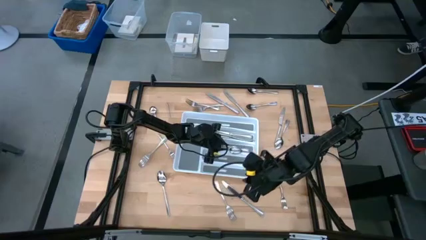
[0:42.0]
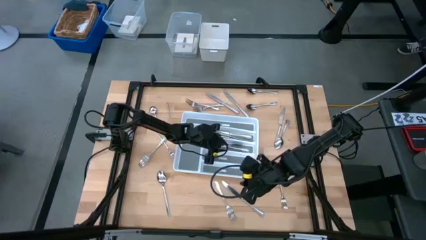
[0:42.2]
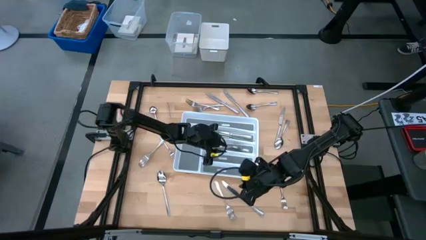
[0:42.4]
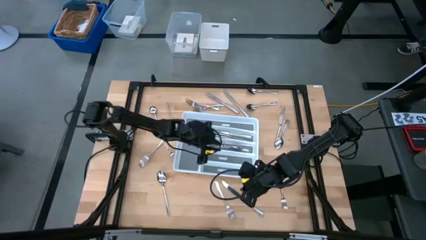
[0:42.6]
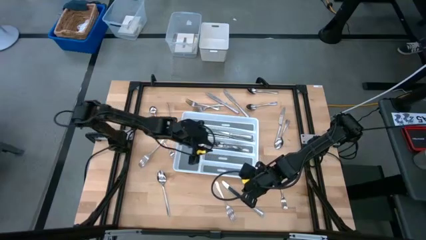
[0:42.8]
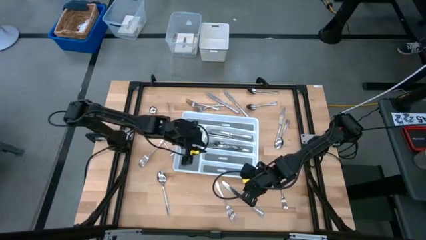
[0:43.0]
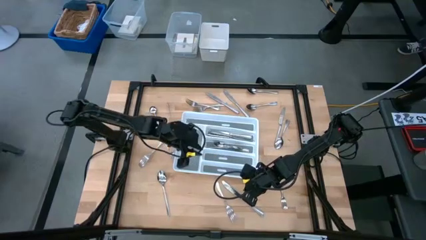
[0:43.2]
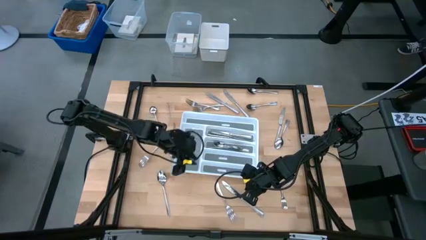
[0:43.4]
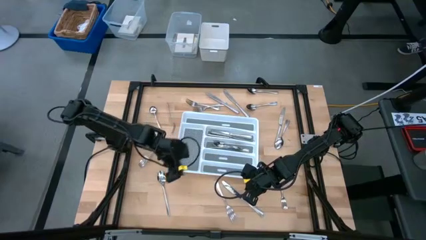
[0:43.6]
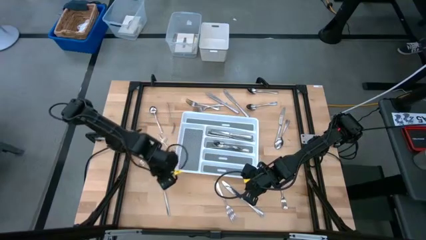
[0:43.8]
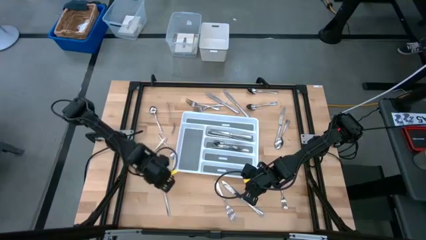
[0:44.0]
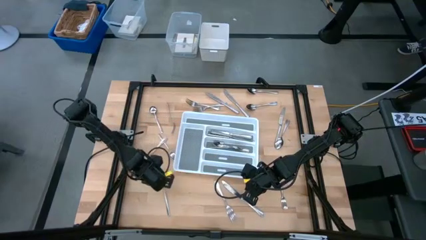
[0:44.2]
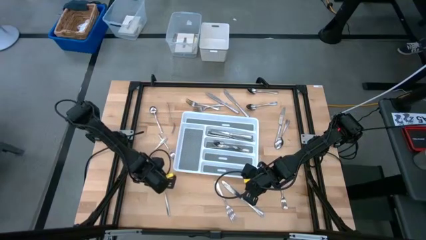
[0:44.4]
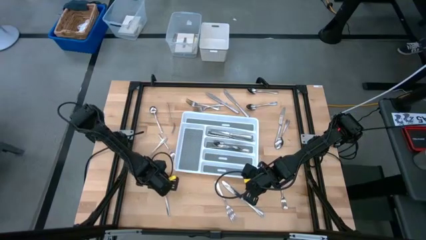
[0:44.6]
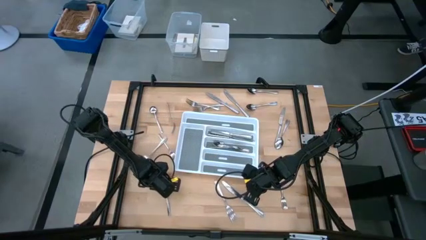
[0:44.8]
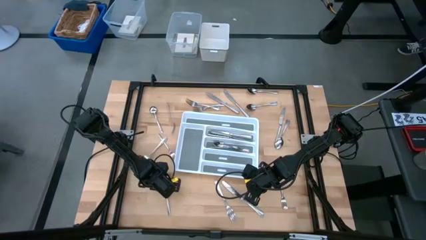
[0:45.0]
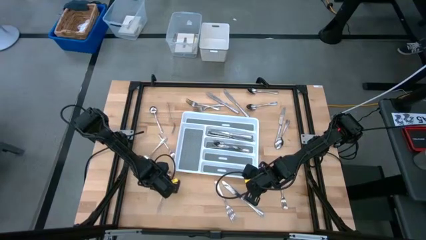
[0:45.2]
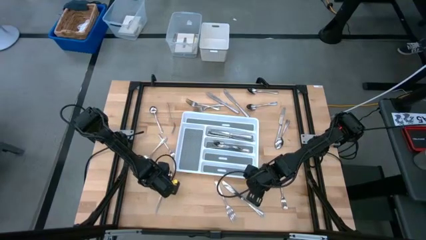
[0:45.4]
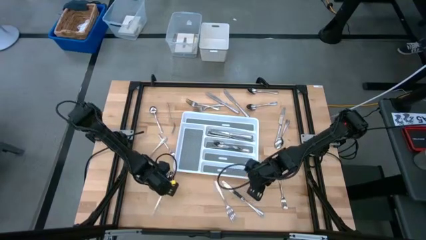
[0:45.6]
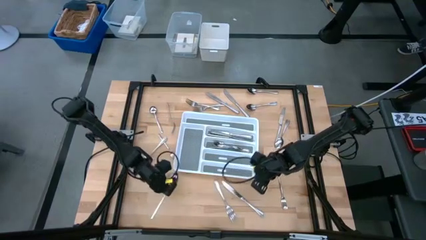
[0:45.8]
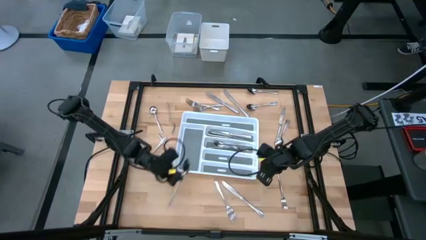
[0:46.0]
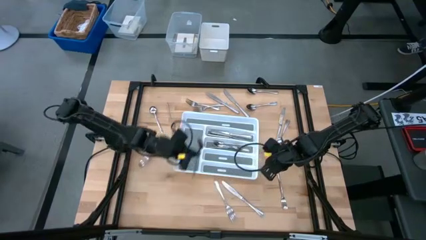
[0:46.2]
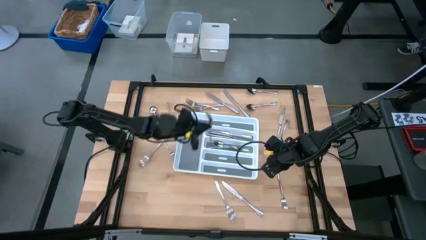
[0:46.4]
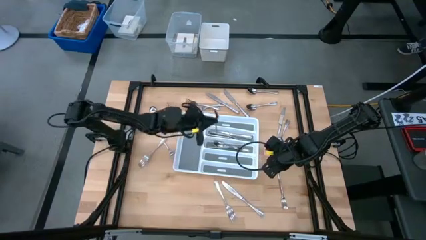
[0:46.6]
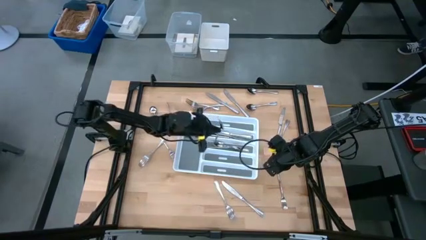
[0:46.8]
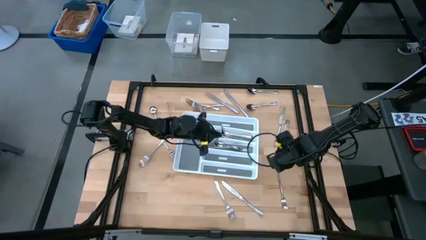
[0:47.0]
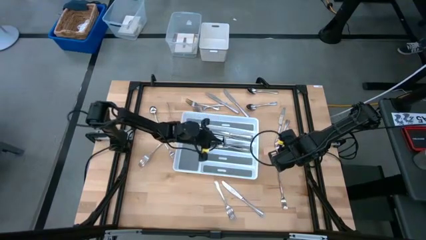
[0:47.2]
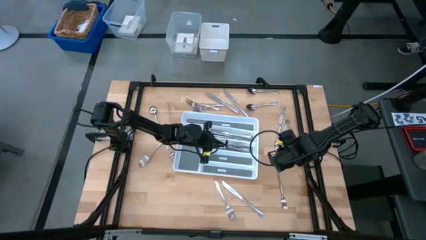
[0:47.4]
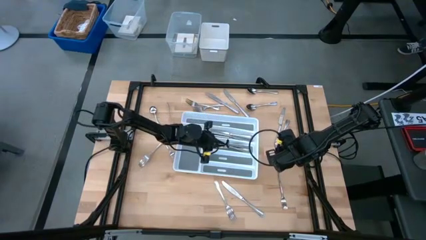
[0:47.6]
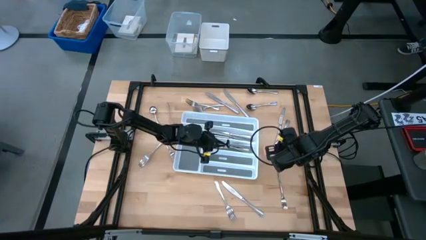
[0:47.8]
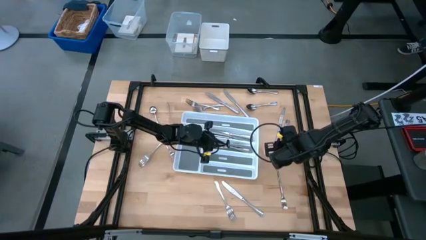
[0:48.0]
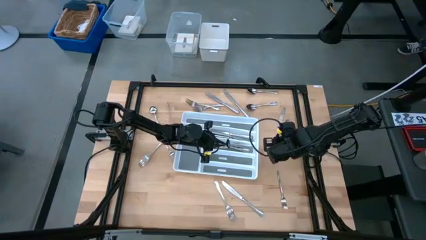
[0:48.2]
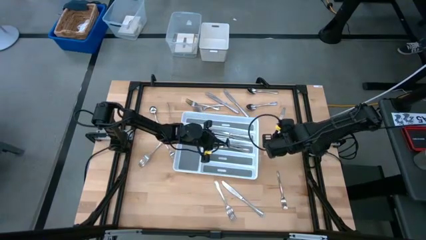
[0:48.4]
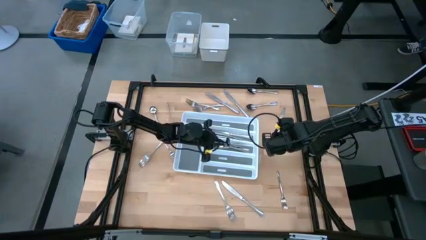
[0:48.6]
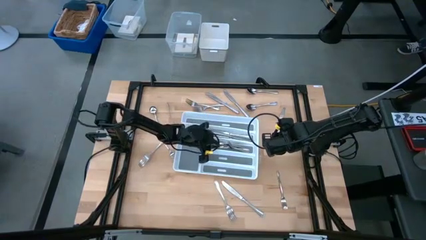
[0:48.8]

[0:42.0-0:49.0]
Task: Sort silverware
Put the spoon into the organizer tray

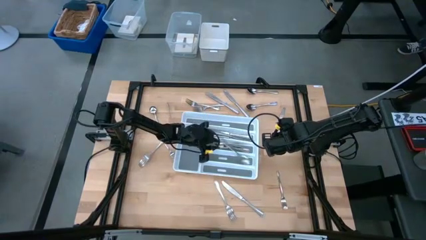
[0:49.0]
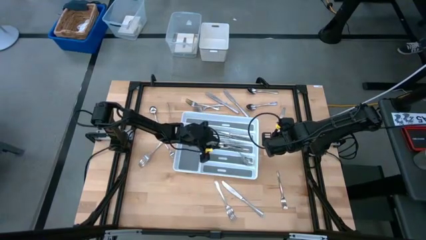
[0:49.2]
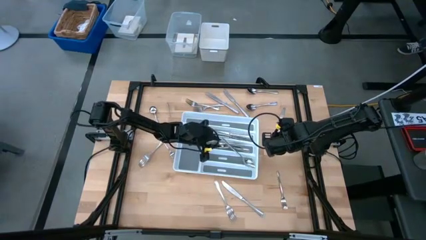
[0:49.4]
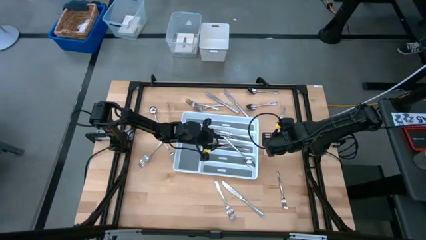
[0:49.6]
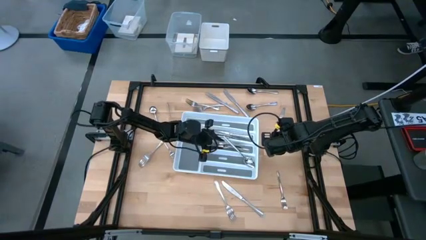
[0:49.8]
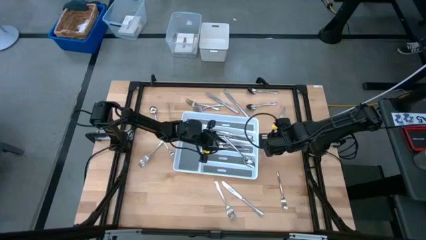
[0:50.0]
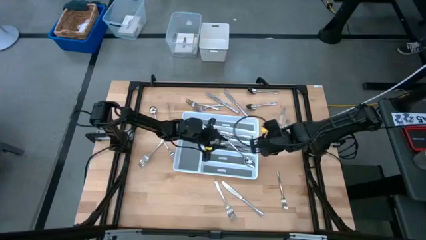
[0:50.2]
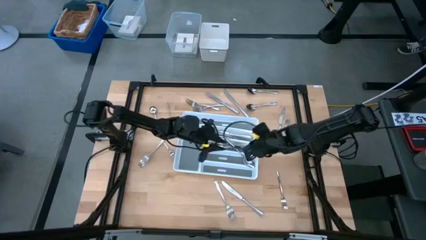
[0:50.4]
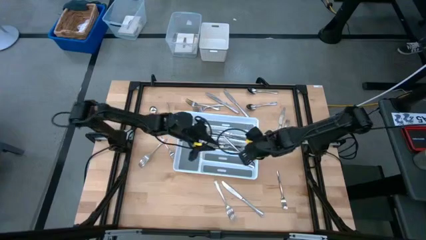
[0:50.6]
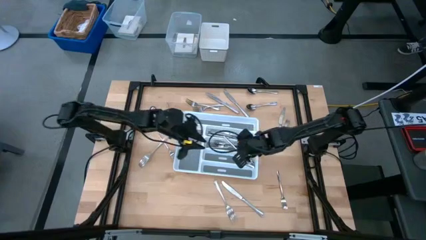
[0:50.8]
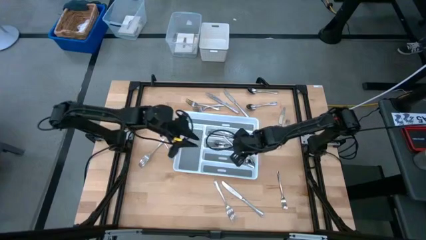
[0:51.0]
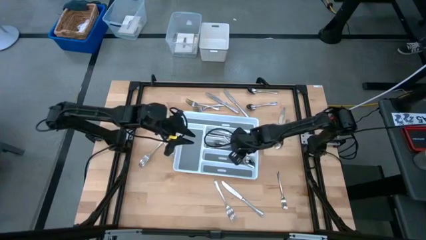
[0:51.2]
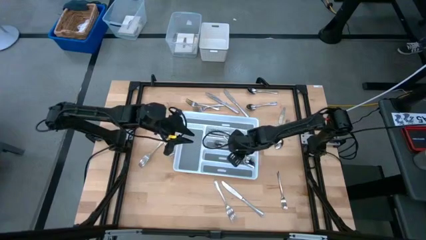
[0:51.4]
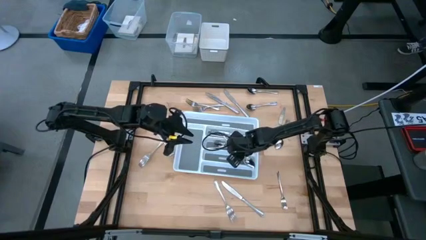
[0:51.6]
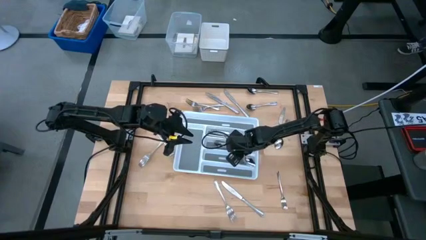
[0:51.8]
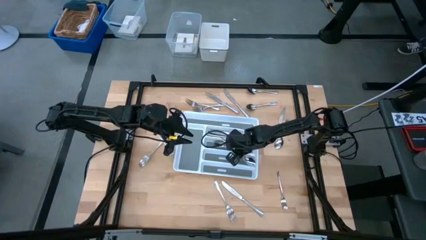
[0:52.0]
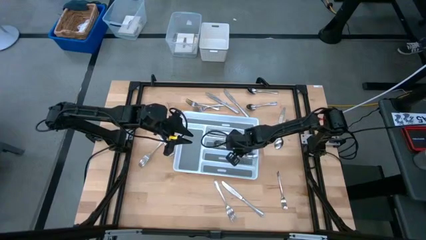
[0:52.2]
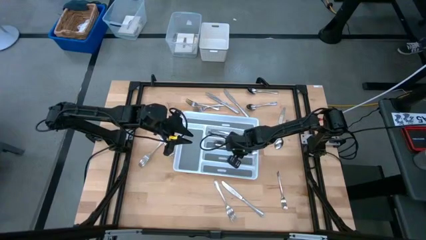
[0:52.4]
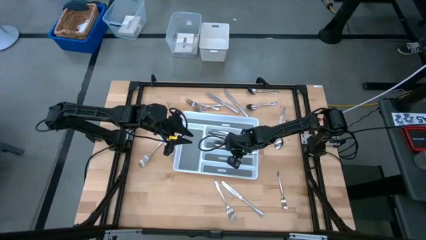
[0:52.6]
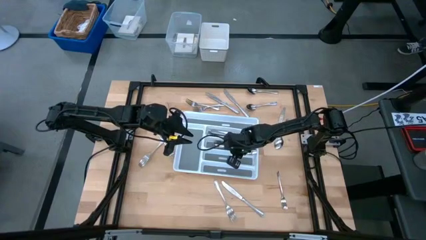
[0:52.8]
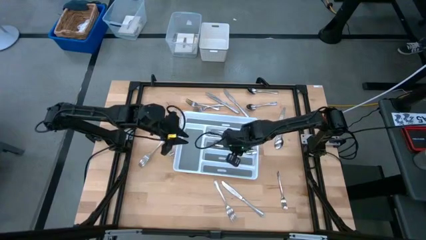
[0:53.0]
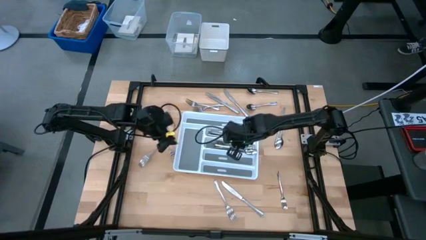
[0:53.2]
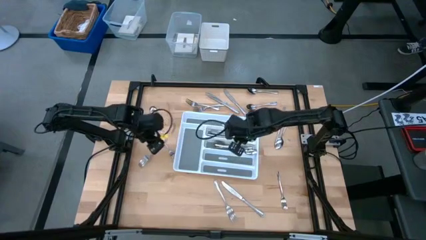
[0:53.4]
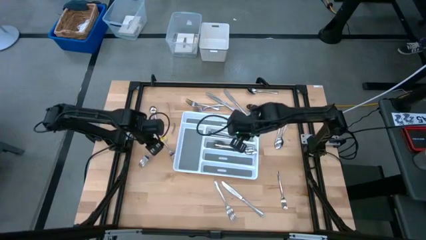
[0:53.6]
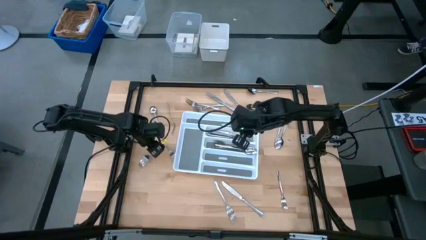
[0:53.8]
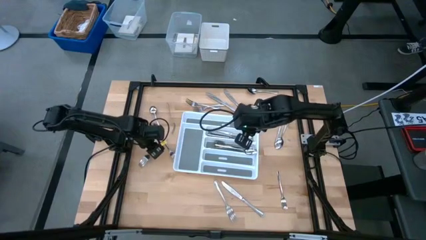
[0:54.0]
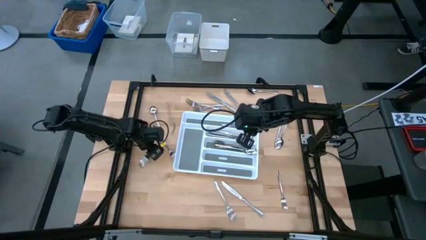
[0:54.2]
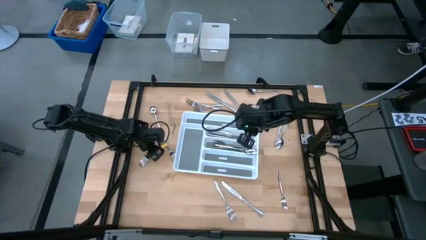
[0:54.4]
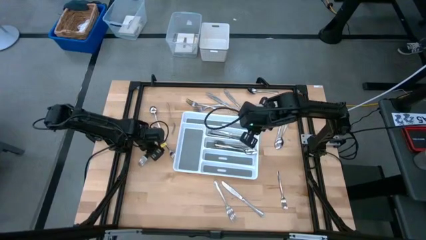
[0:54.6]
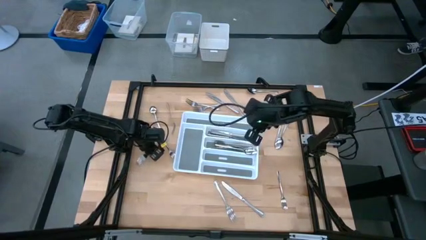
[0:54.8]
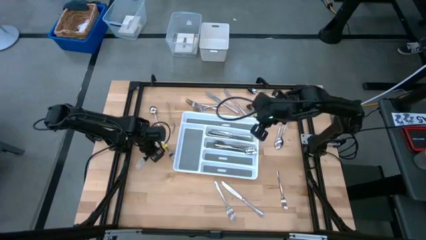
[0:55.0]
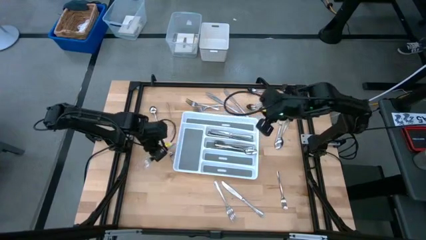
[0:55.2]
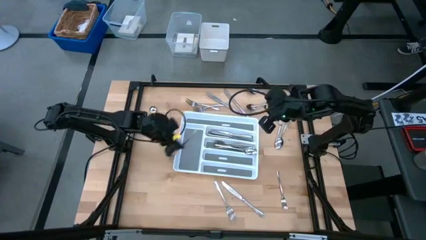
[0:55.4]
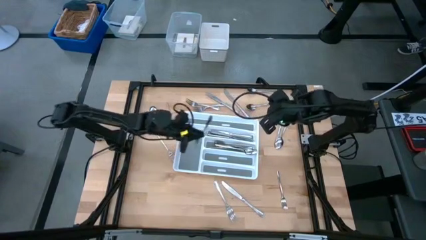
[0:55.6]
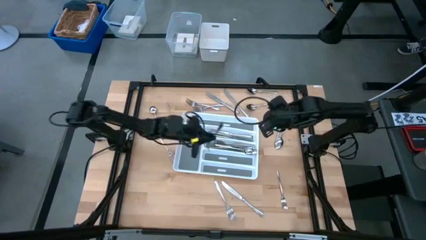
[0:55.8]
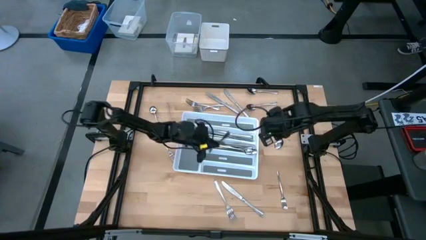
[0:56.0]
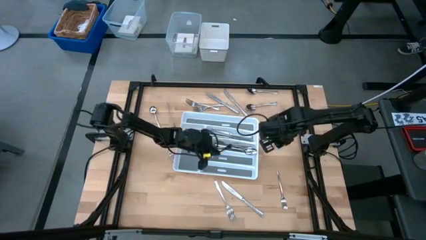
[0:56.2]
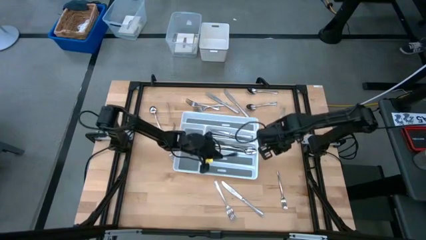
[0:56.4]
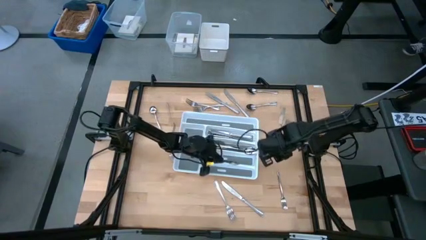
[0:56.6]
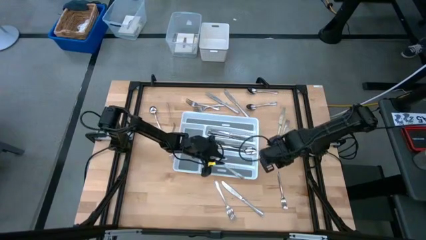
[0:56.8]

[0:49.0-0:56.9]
Put the fork into the organizer tray
